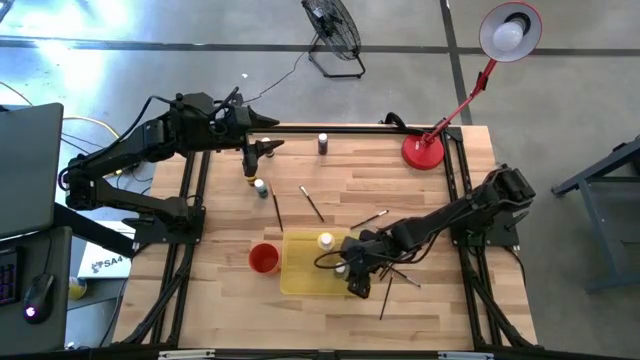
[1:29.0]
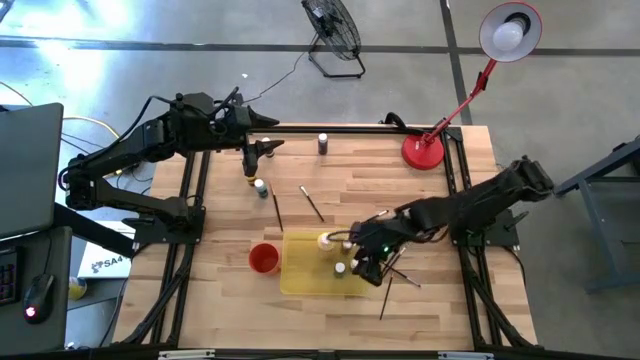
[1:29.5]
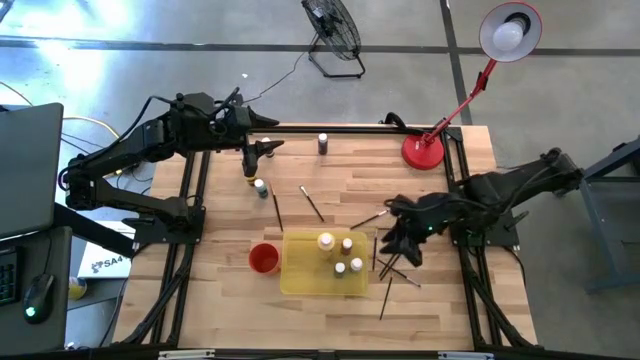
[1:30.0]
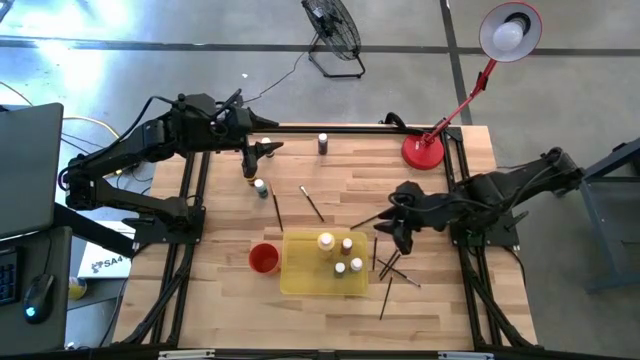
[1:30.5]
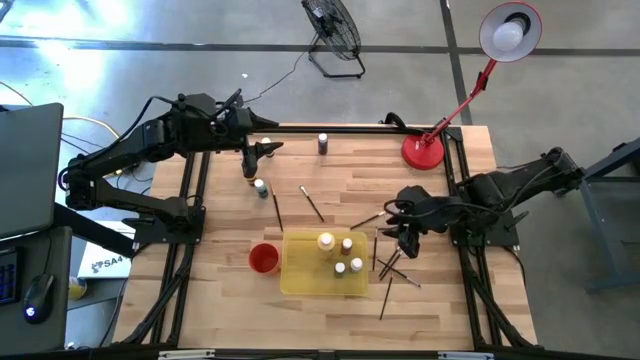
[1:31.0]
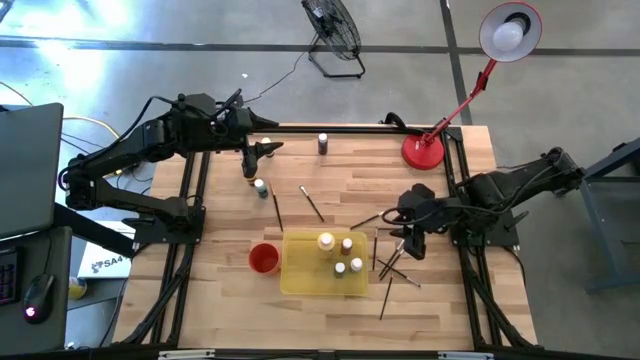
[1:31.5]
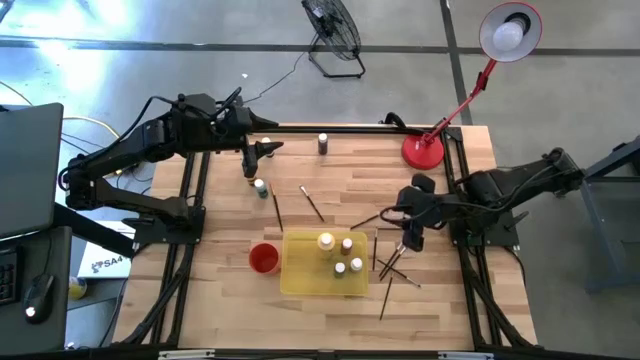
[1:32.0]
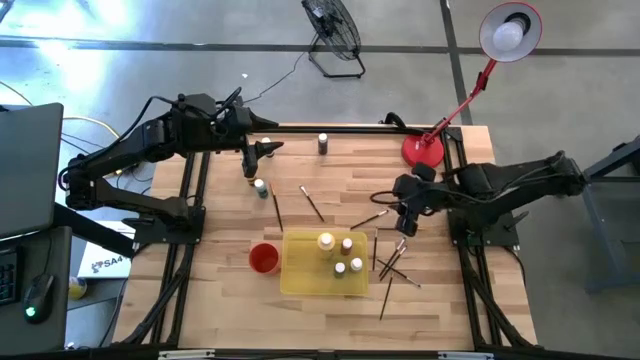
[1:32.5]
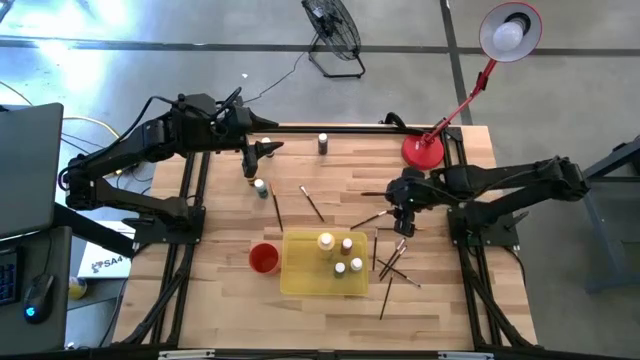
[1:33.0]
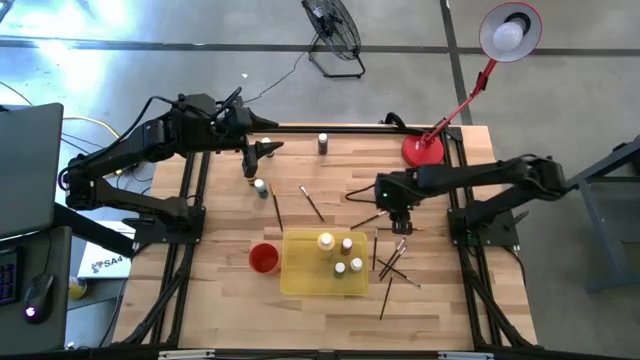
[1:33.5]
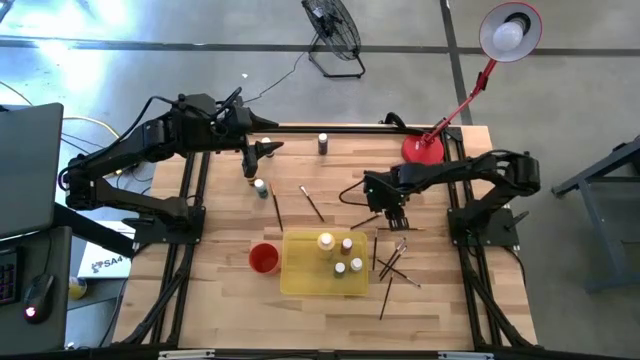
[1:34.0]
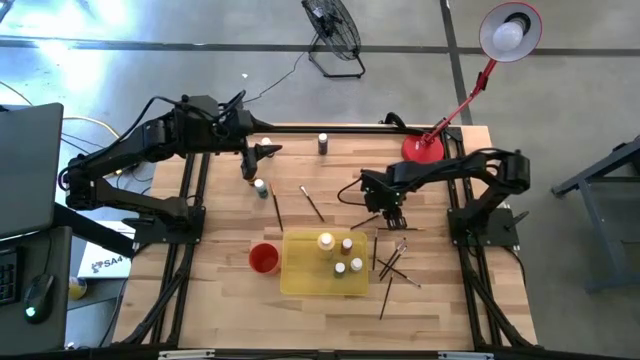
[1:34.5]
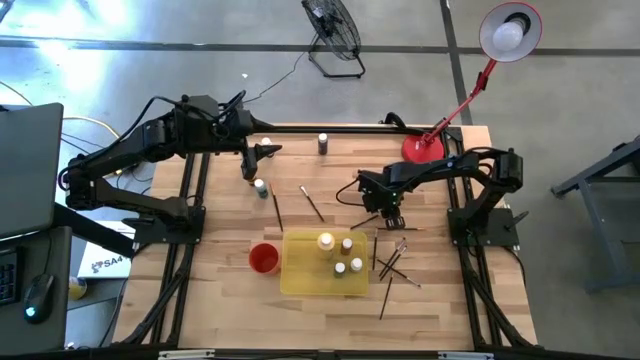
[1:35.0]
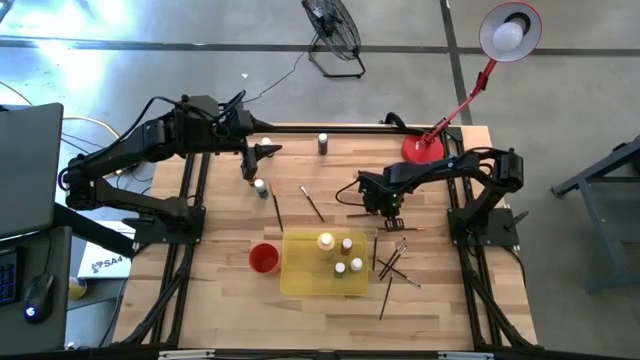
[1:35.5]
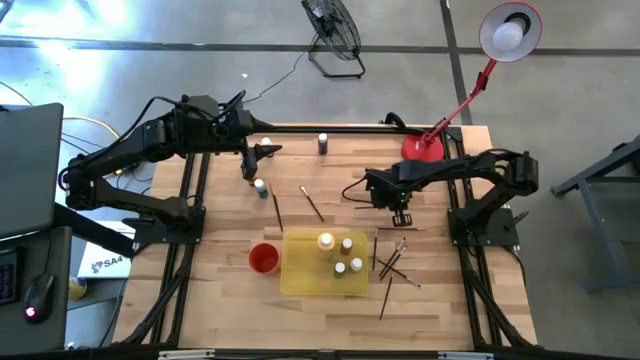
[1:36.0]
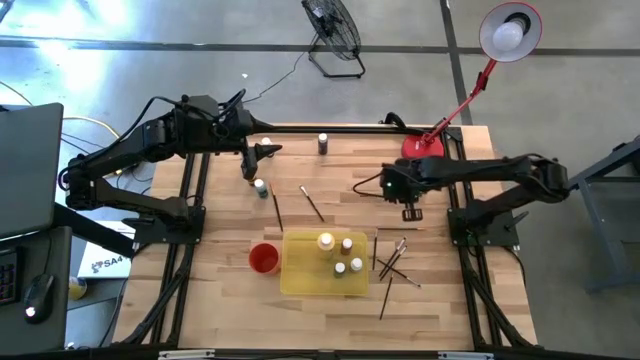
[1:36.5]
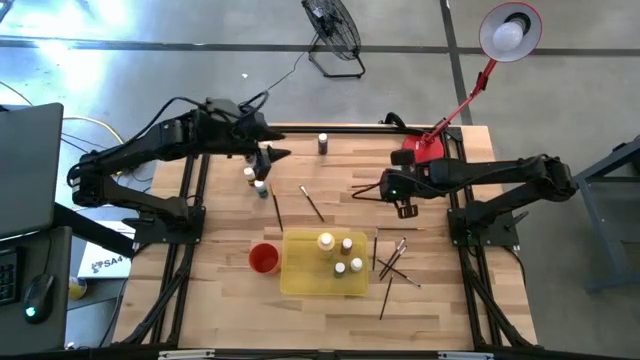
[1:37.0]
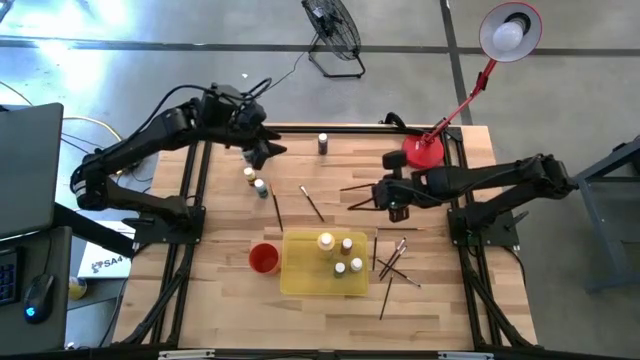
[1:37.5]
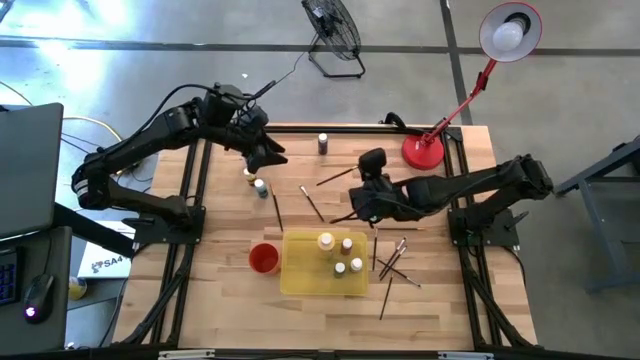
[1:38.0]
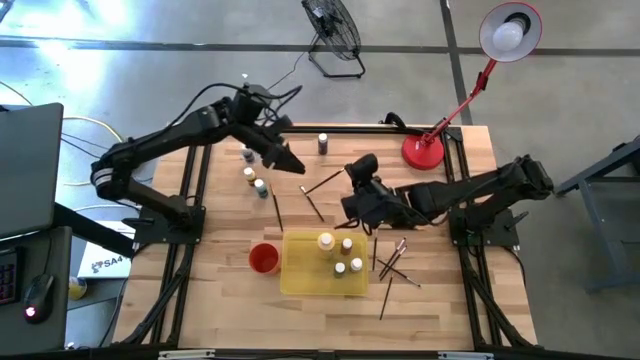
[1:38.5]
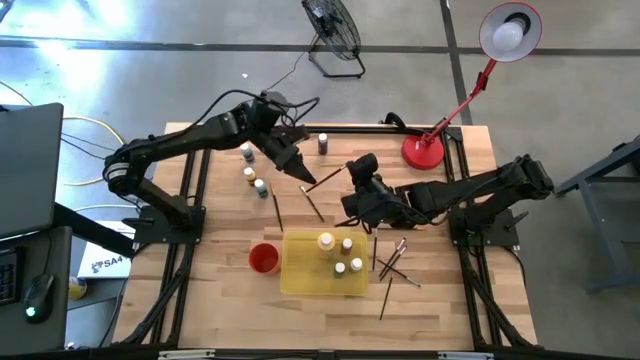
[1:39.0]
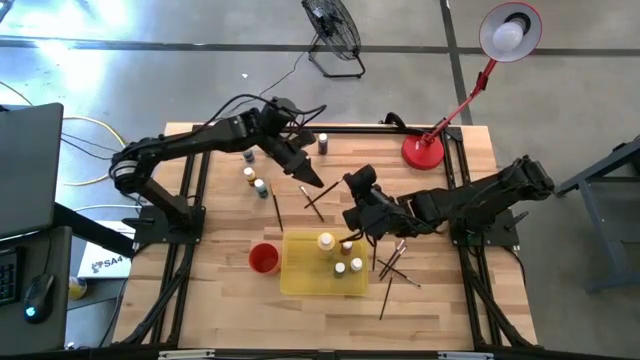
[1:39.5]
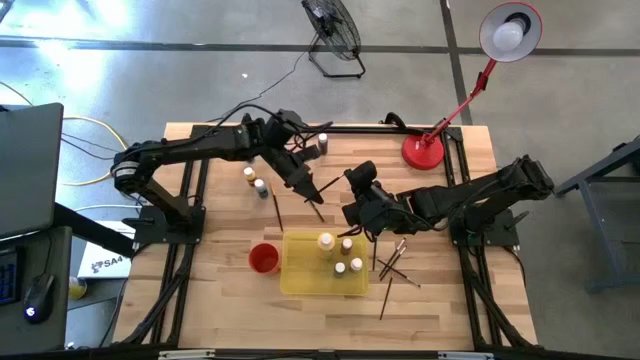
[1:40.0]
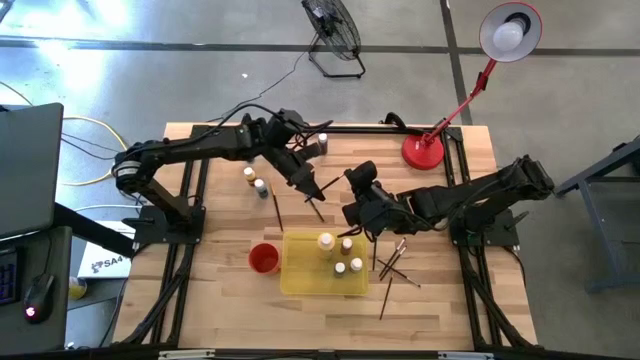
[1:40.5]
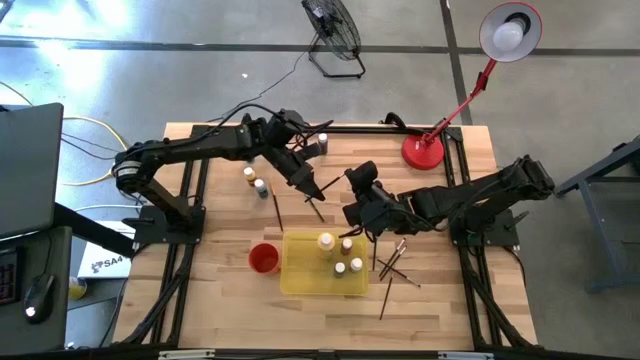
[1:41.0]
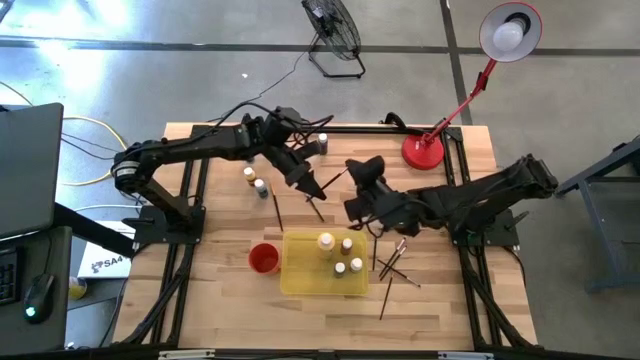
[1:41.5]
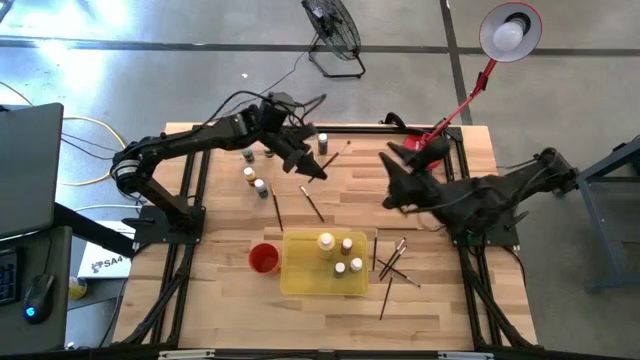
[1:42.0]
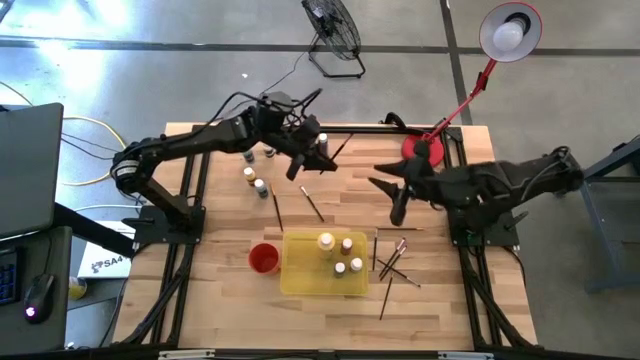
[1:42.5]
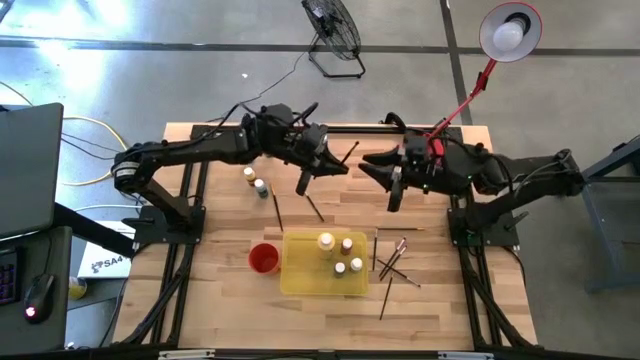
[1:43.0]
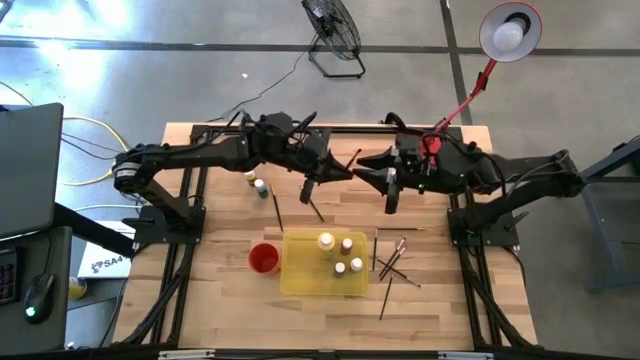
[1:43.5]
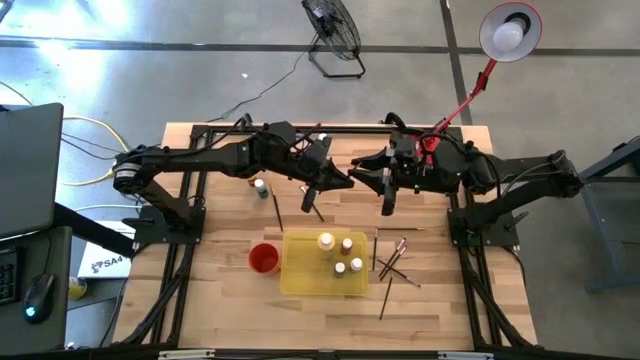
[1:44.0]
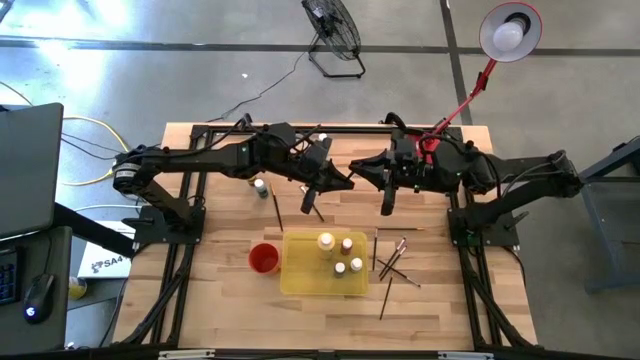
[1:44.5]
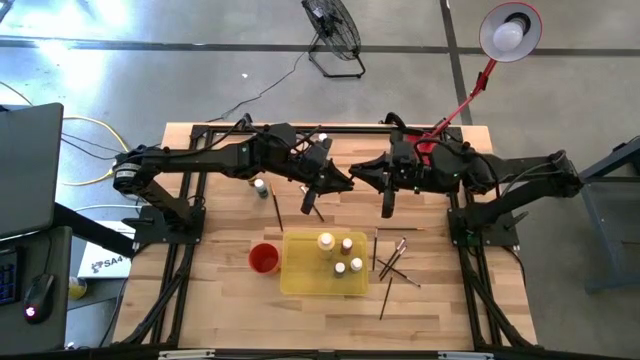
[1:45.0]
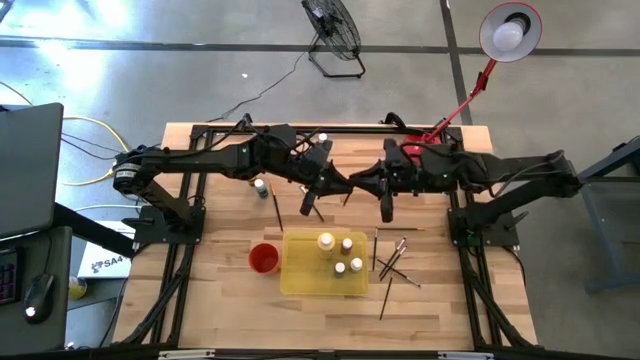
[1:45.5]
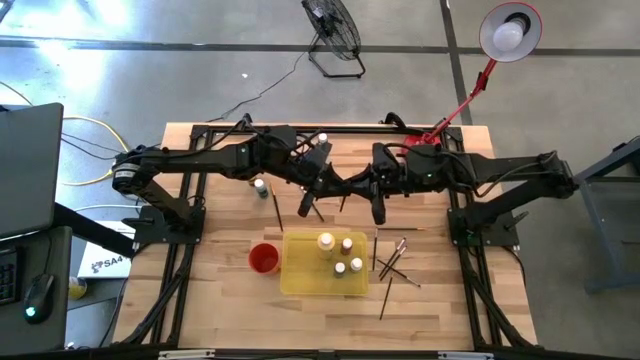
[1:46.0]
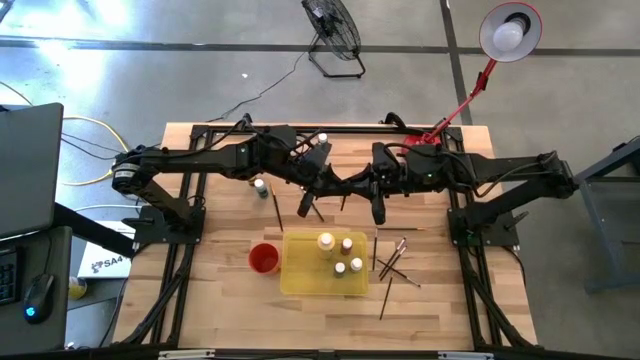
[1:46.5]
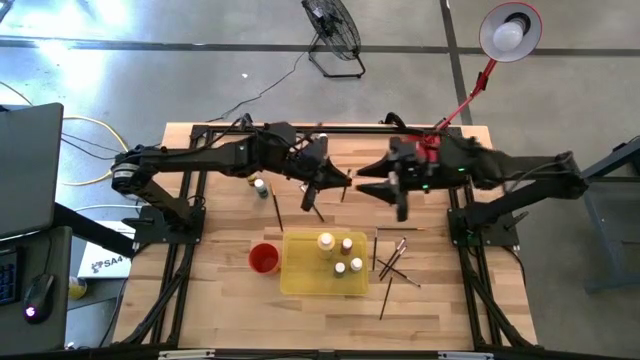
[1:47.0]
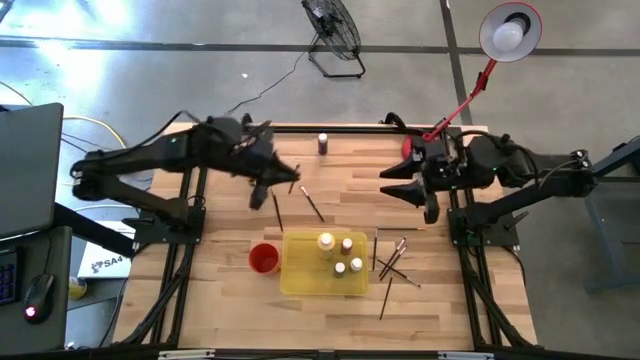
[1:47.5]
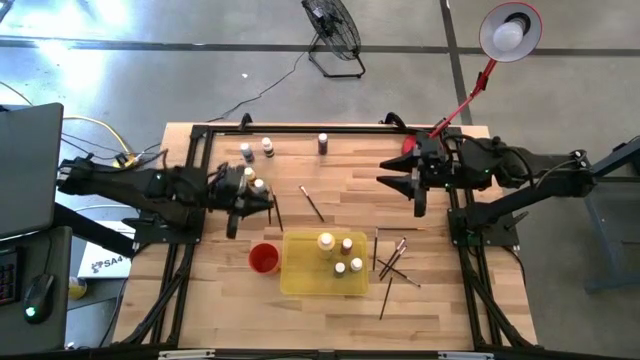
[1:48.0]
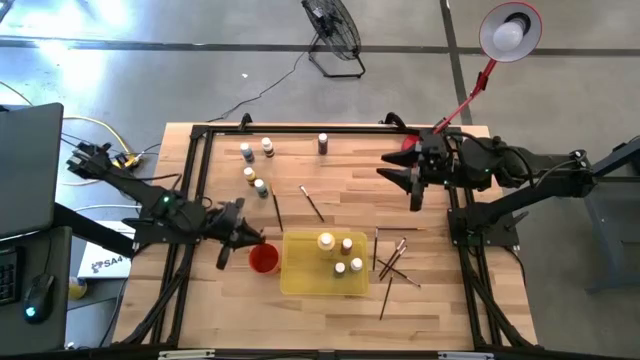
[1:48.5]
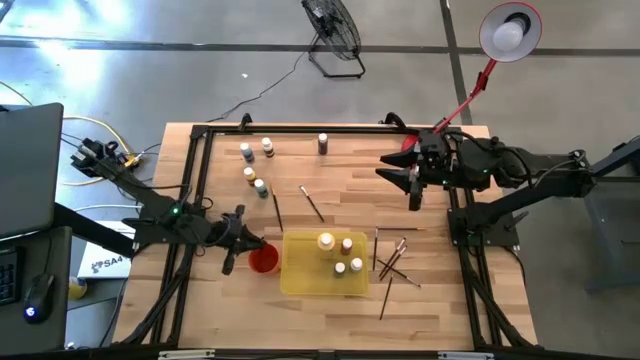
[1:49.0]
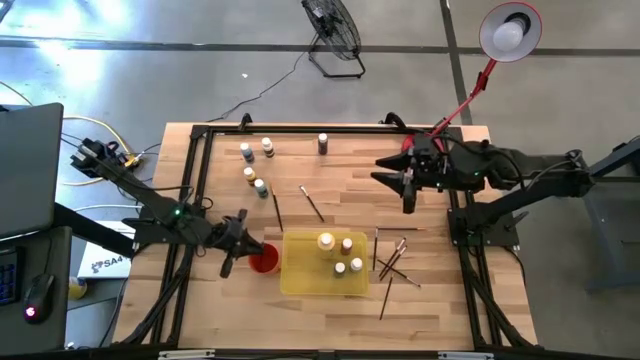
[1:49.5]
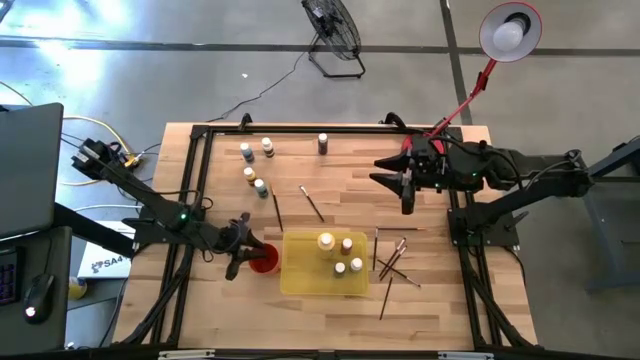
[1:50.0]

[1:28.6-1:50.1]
Task: Pick & Place Paint Supplies
Put the silver paintbrush into the orange cup
